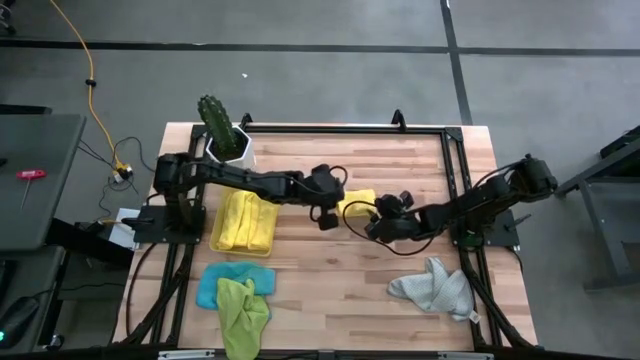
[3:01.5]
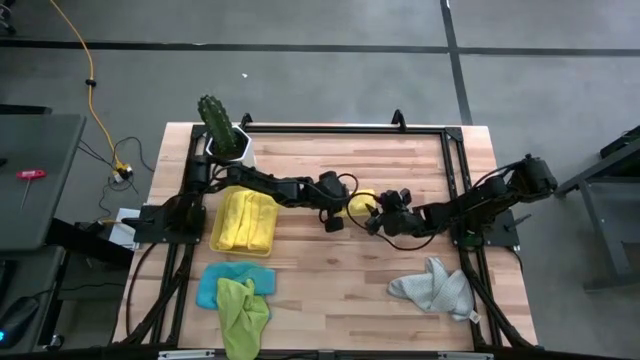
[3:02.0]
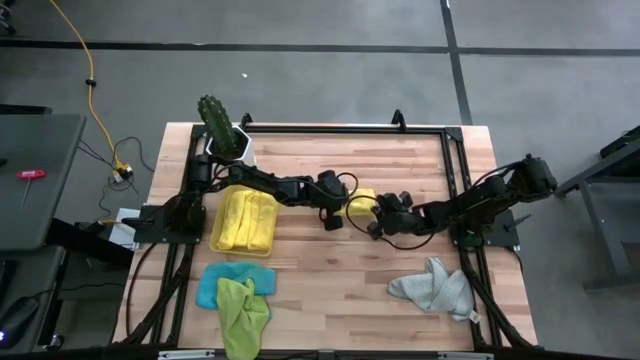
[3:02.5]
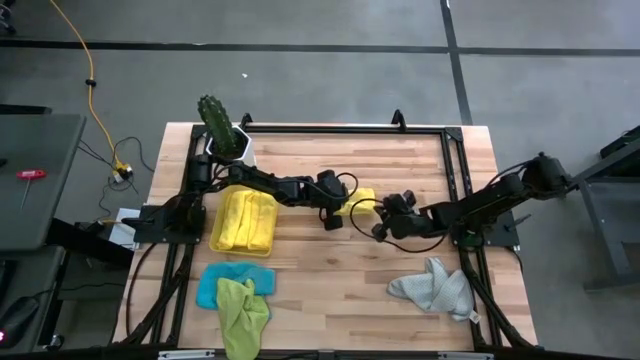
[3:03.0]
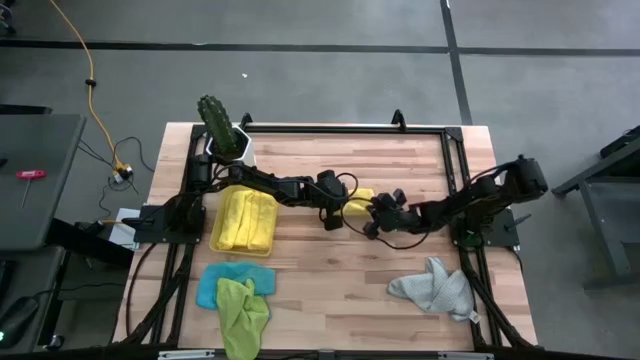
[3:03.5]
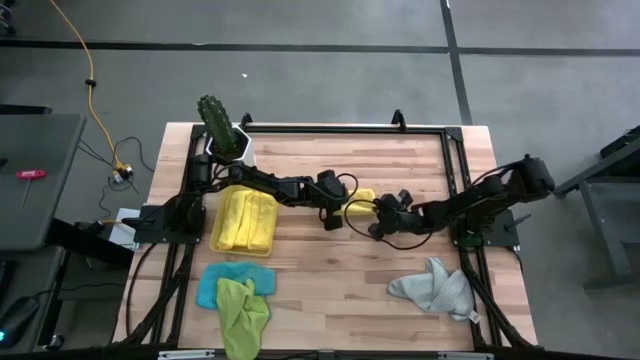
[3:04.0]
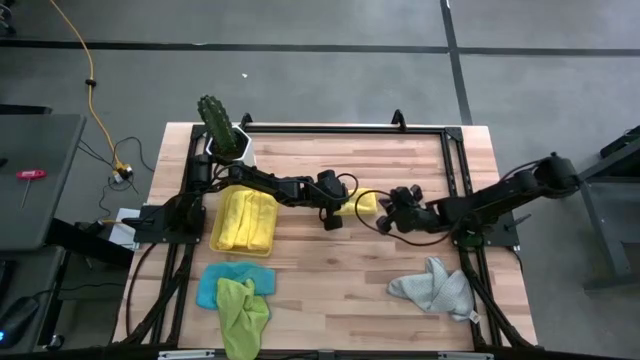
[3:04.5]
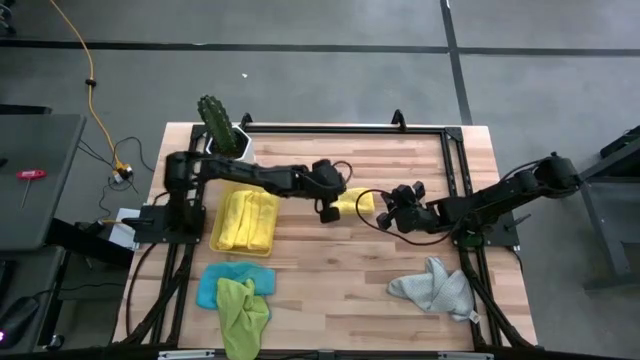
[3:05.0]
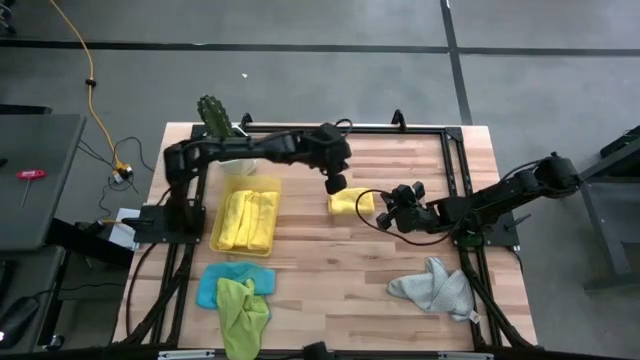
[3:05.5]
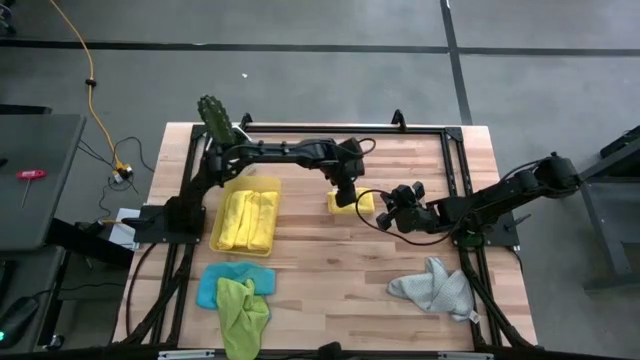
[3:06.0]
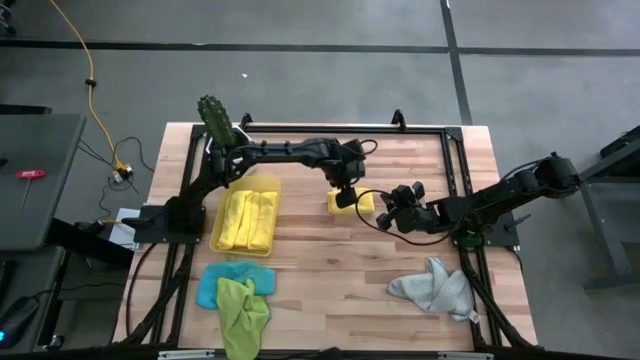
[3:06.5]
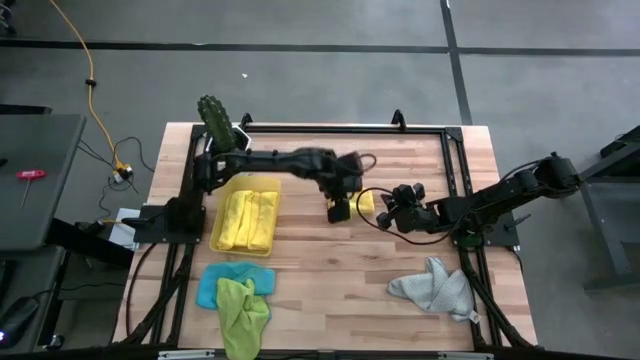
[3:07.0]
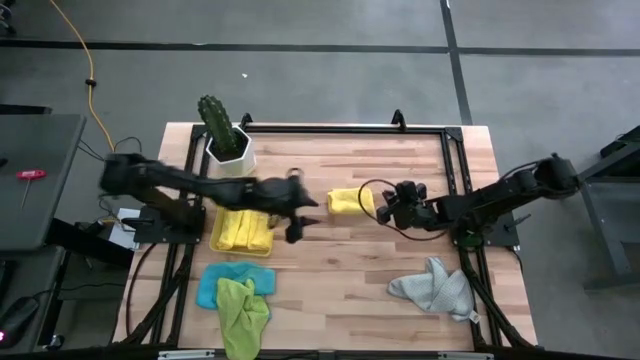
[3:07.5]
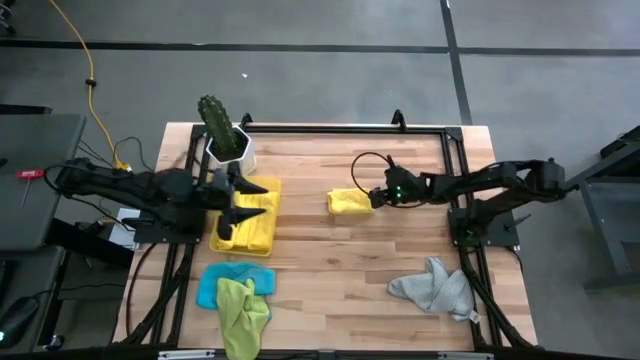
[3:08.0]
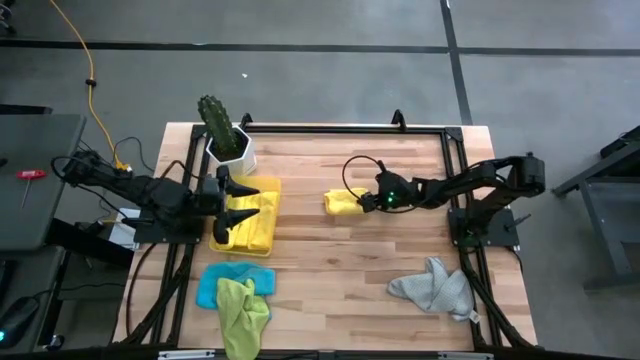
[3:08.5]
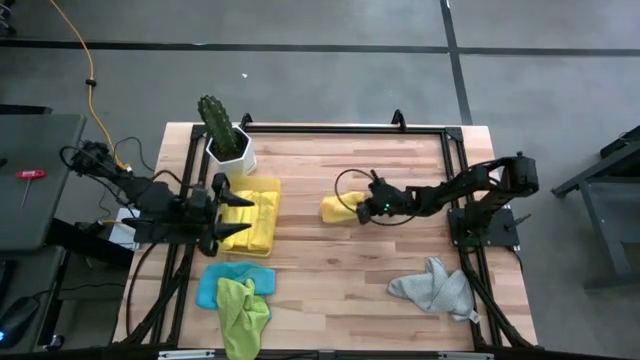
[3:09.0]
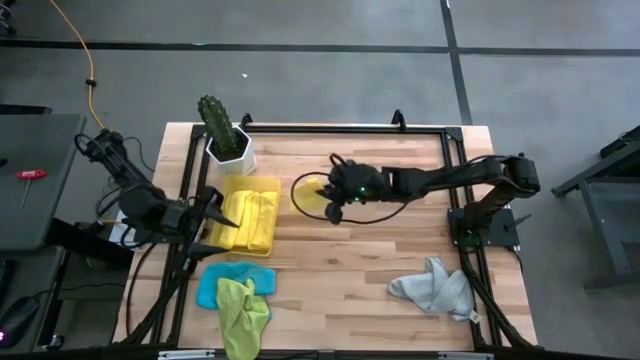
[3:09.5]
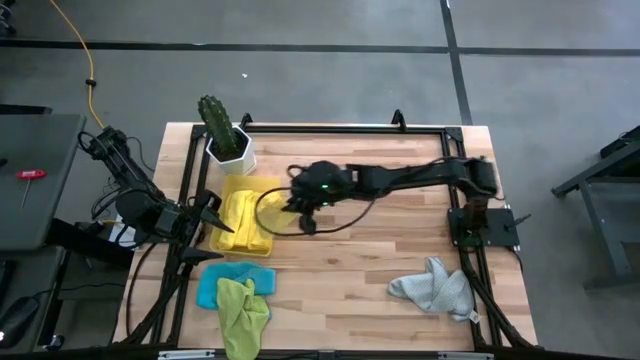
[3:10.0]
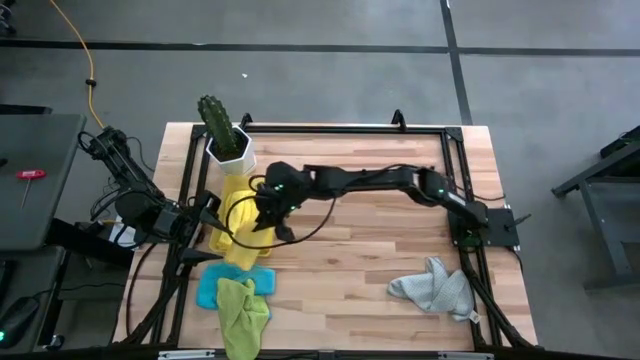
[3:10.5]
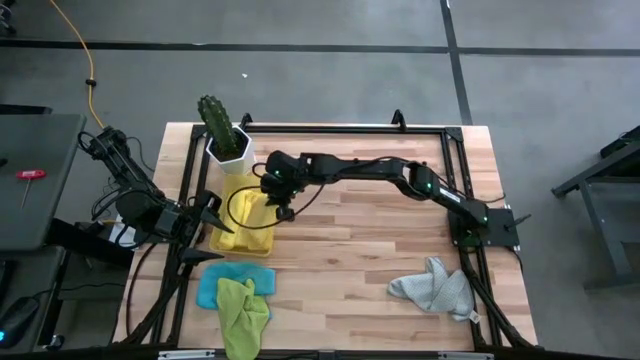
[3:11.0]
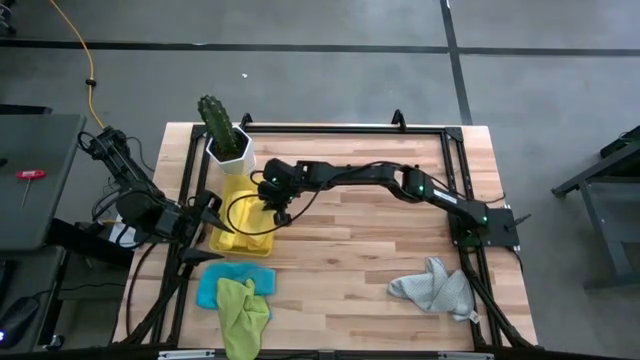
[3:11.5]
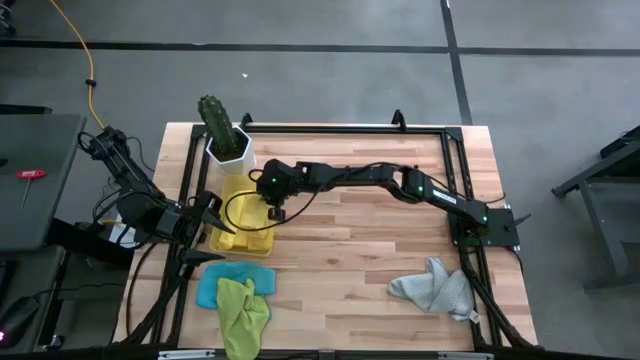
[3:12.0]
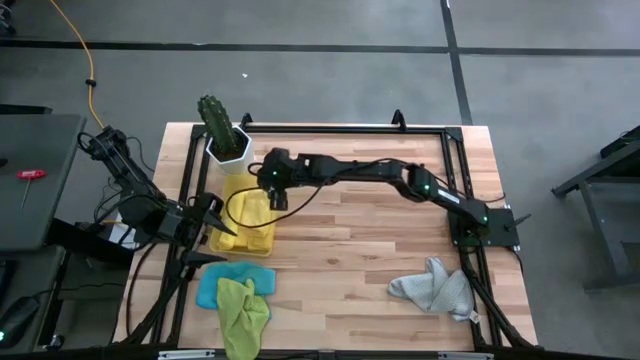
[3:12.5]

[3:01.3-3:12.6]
Task: Fold microfiber towels
Put the folded yellow microfiber towel into the yellow bin

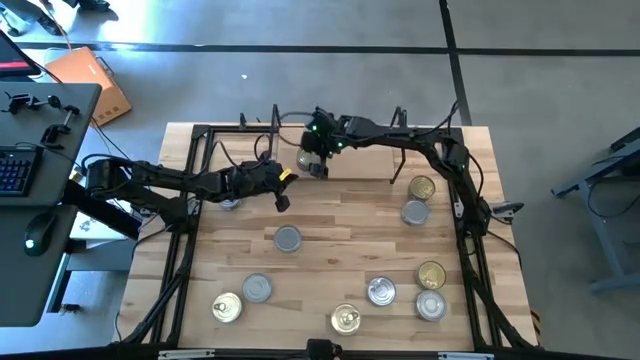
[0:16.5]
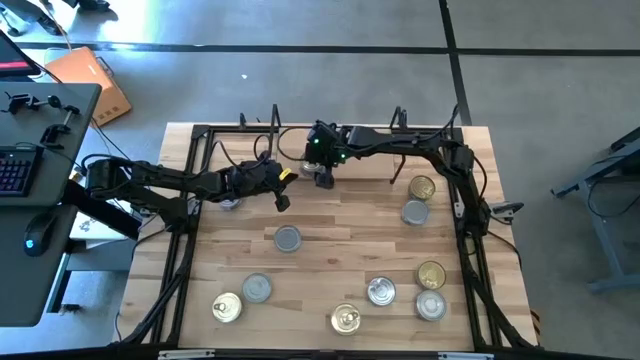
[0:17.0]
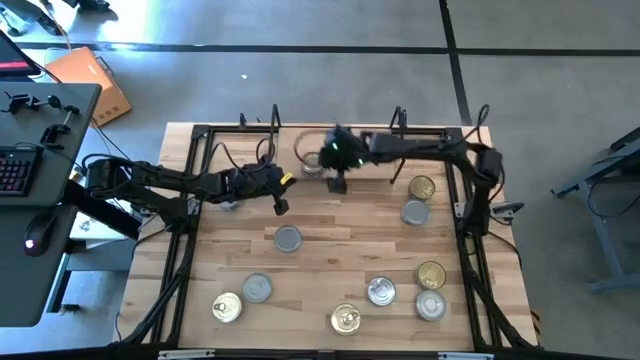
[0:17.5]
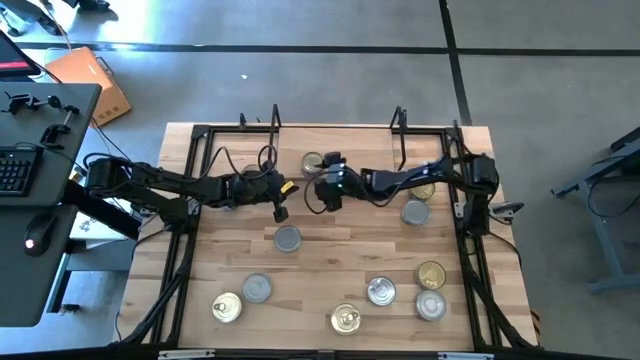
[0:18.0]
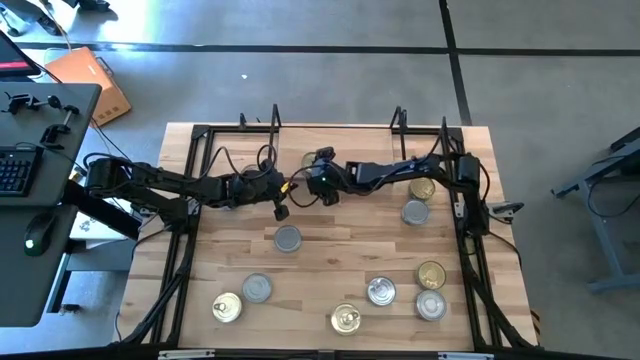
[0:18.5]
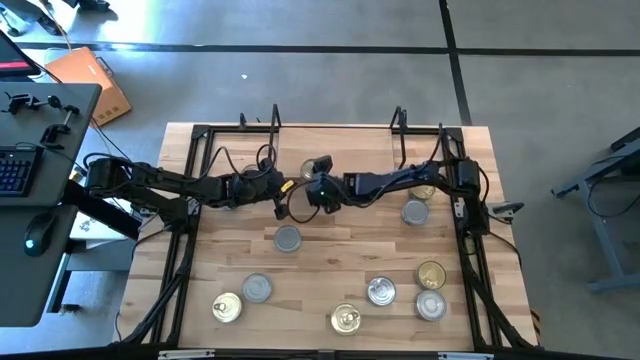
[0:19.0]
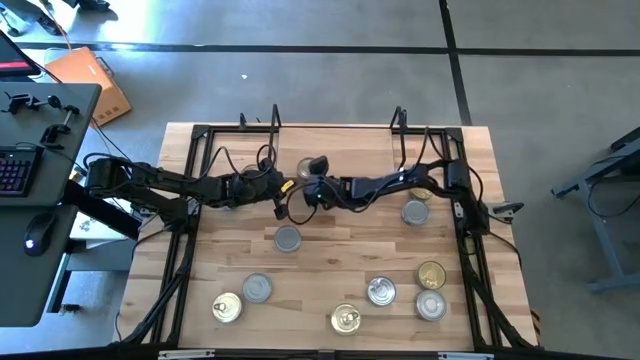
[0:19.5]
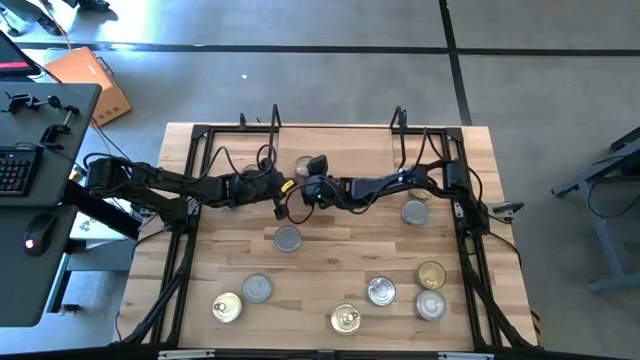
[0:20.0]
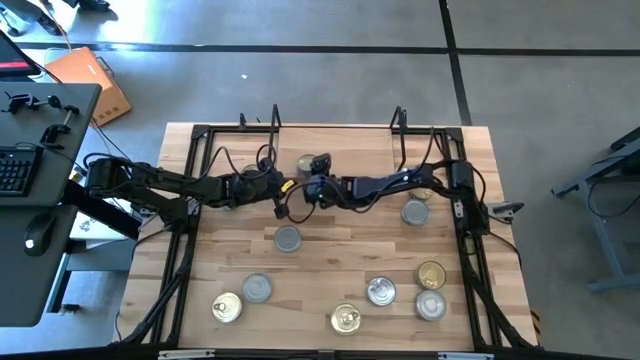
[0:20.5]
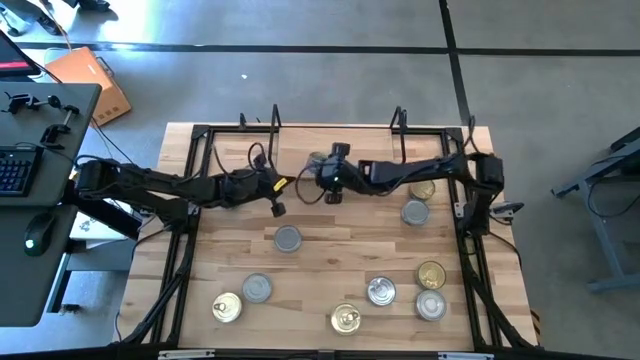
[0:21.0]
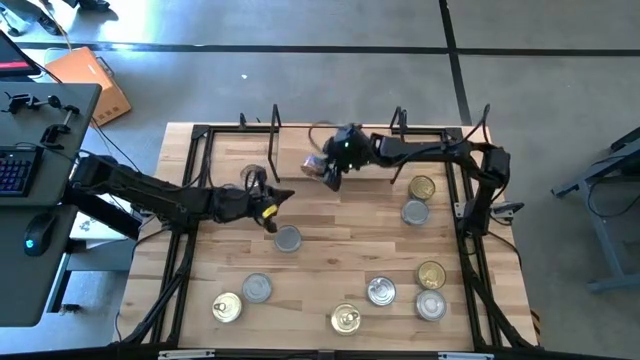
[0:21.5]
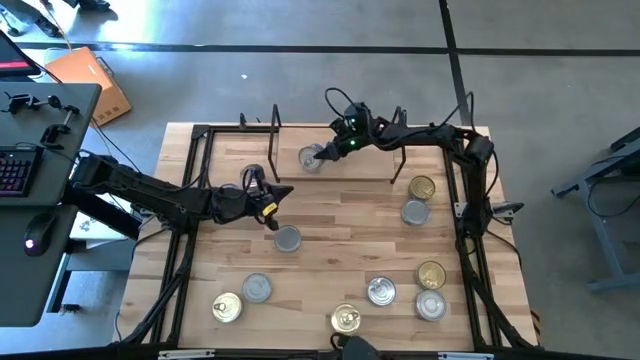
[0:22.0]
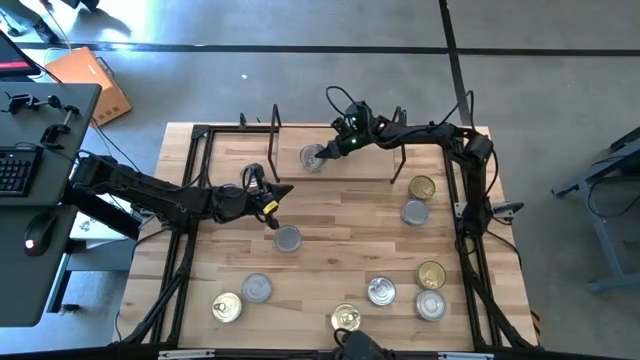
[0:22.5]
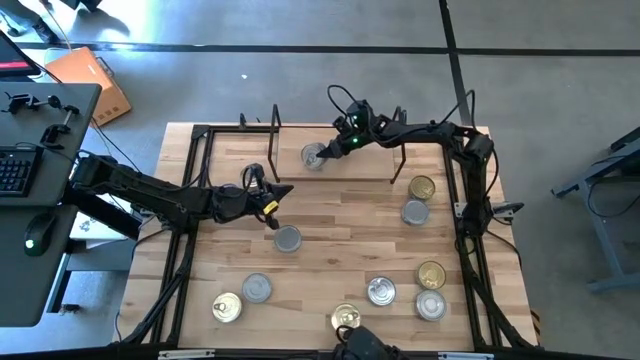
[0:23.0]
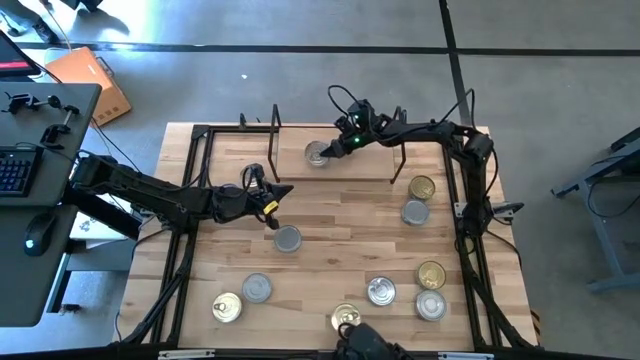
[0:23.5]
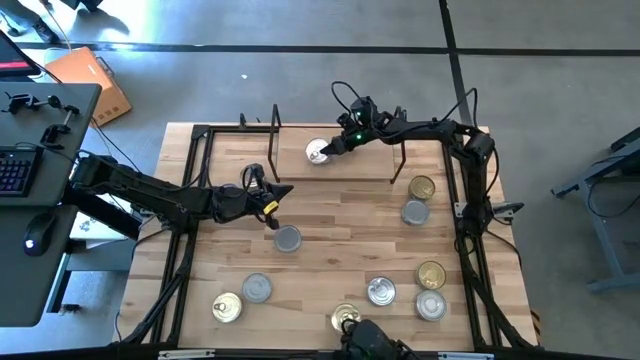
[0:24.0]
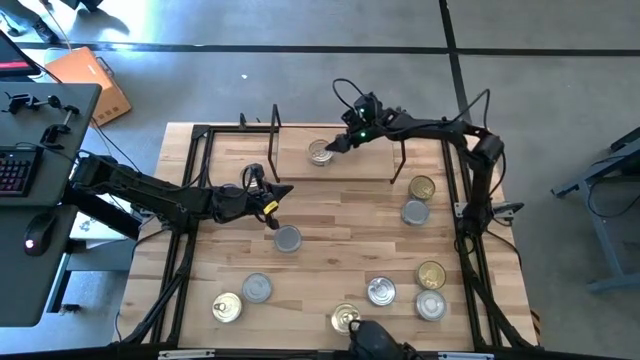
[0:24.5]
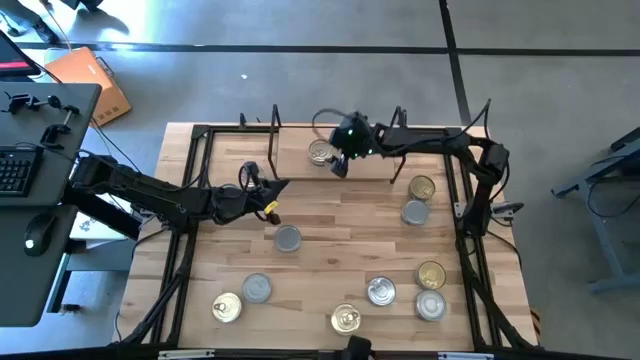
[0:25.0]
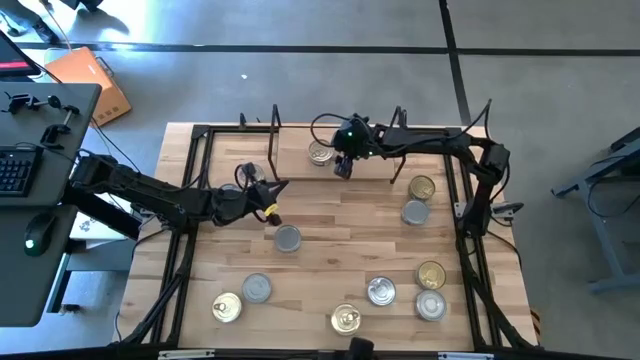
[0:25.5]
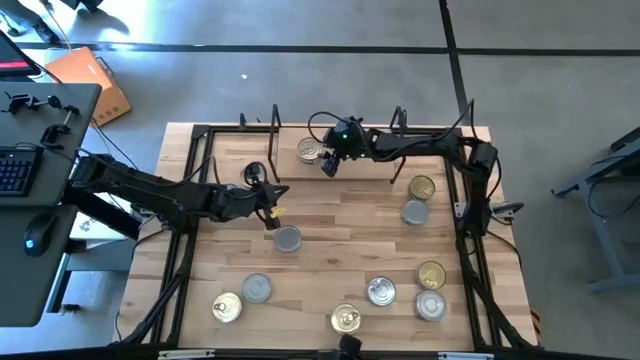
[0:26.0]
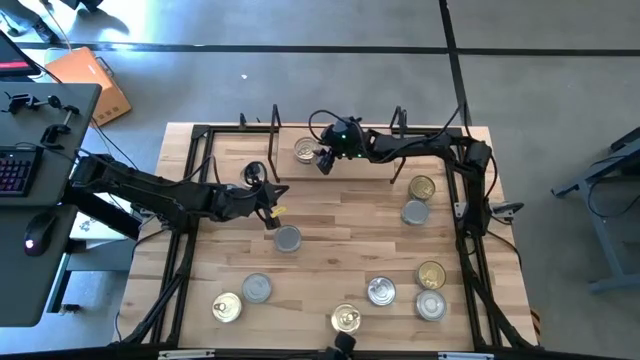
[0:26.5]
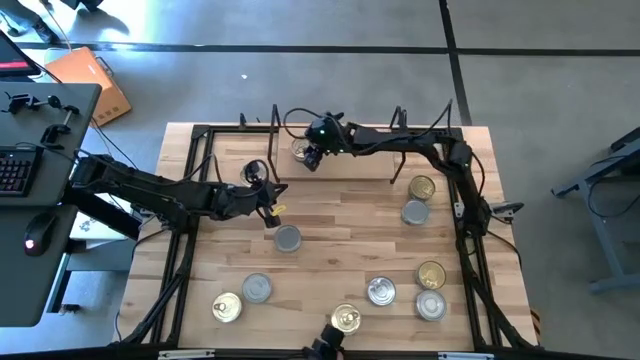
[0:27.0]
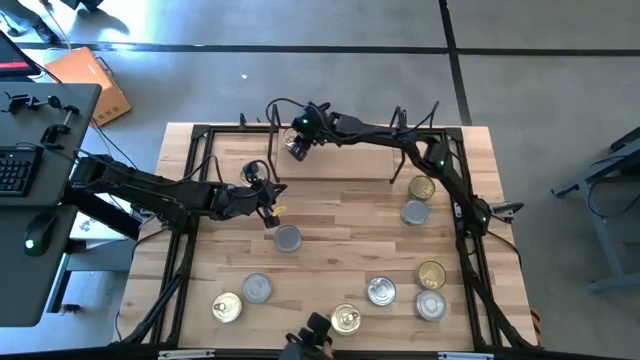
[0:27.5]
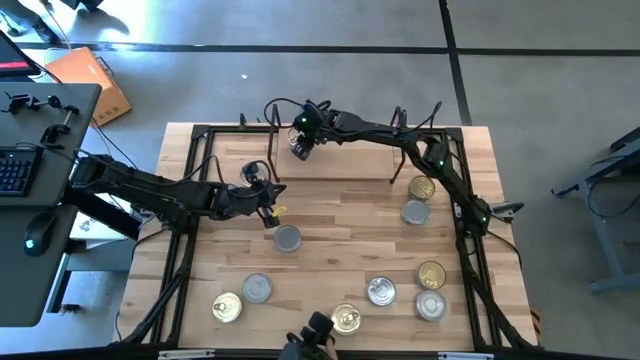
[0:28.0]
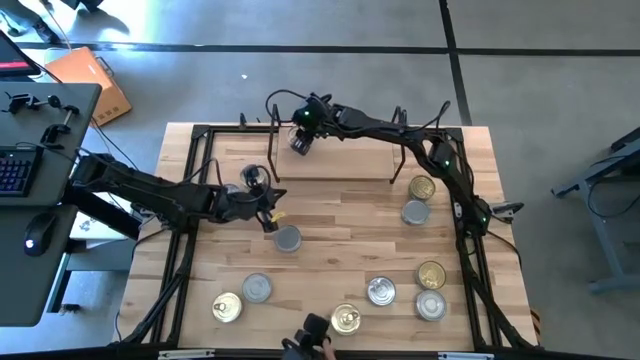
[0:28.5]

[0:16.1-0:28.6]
Task: Stack canned seafood by type on shelf
Put the blue-pink tuna can on the shelf
